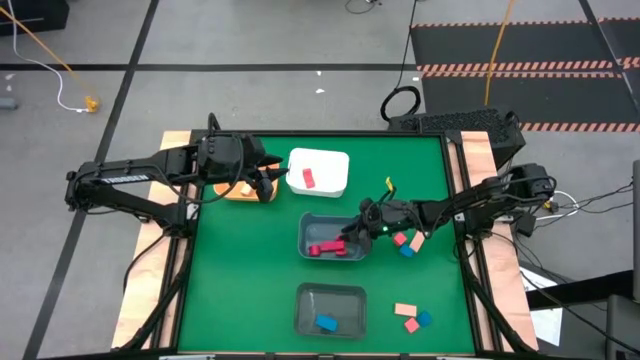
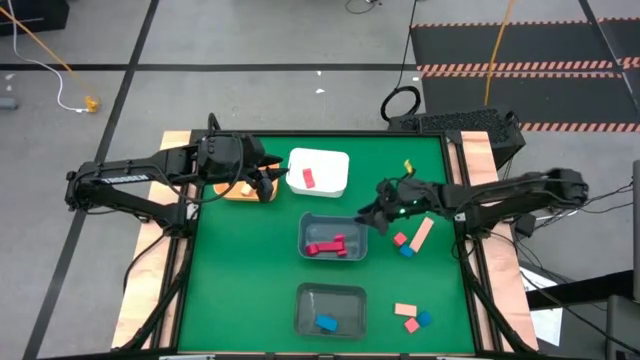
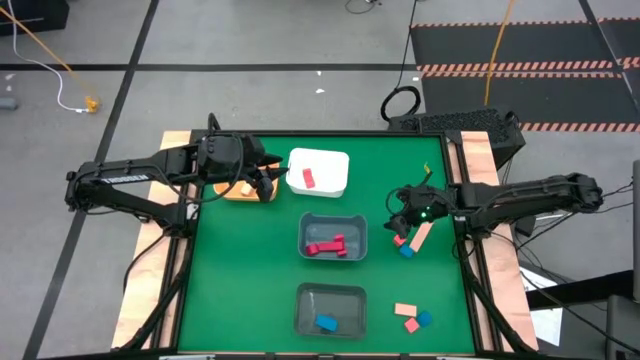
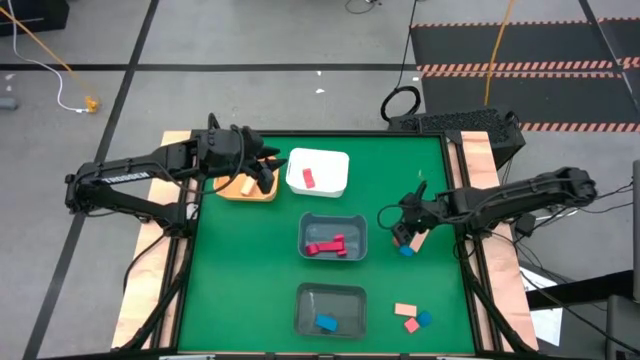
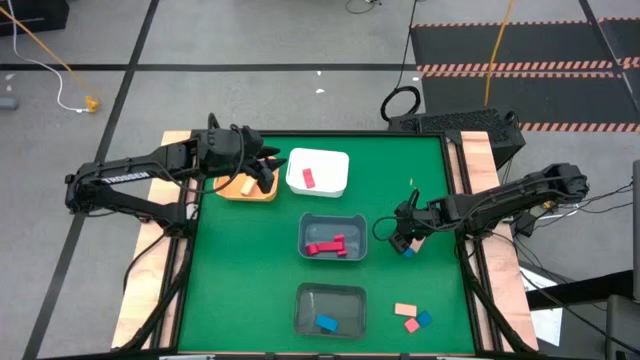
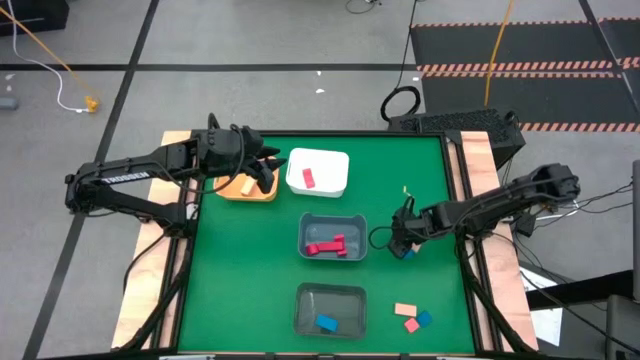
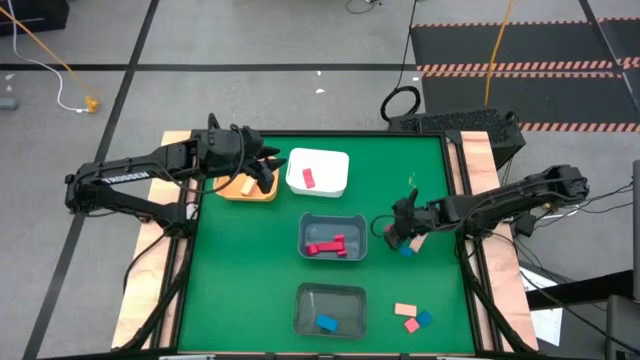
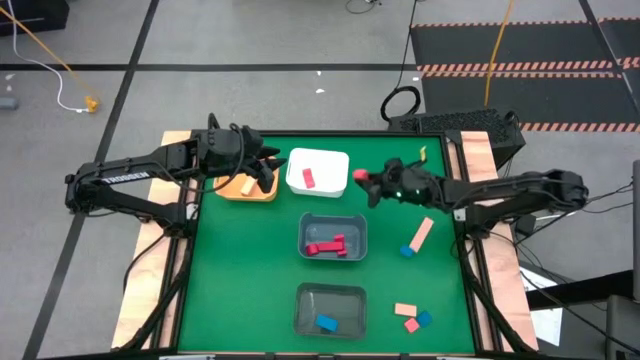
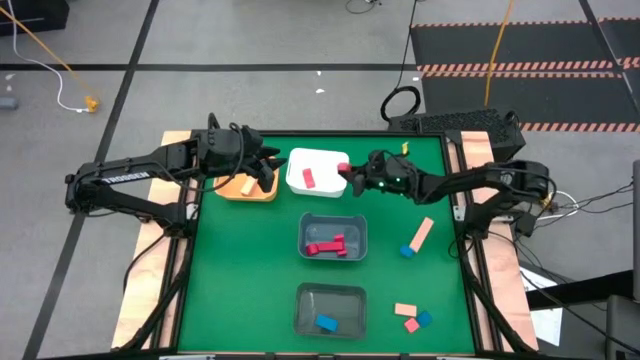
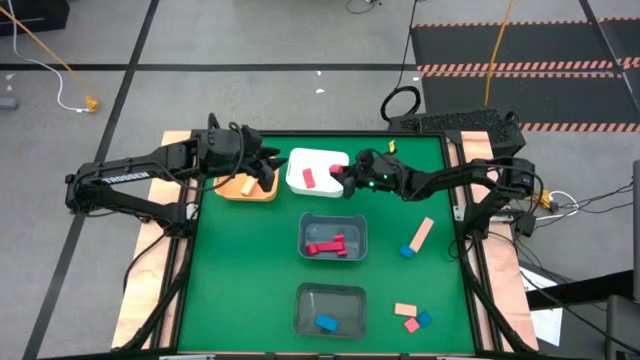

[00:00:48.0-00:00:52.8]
Task: Sort & place blocks by color
Put the top orange wooden block into the white bin

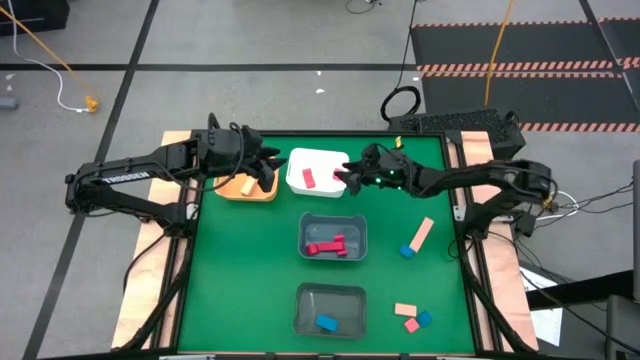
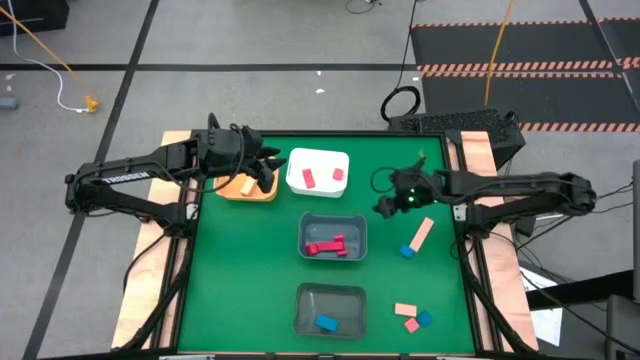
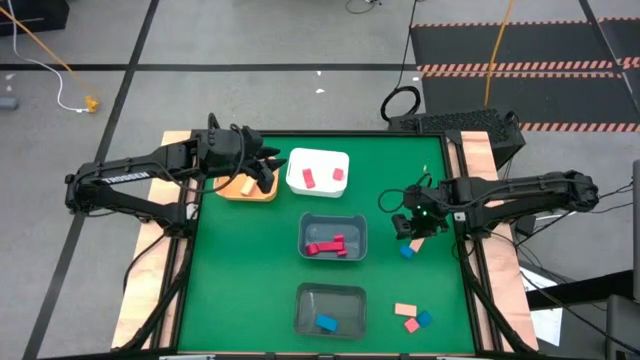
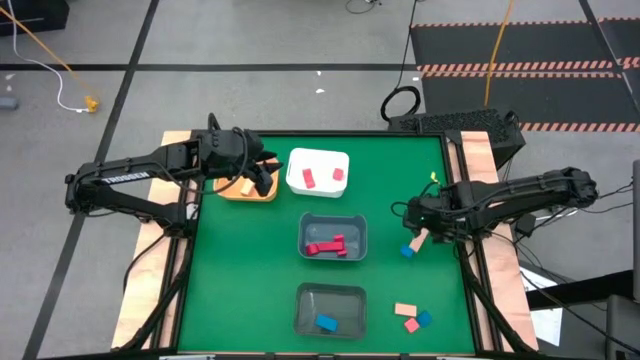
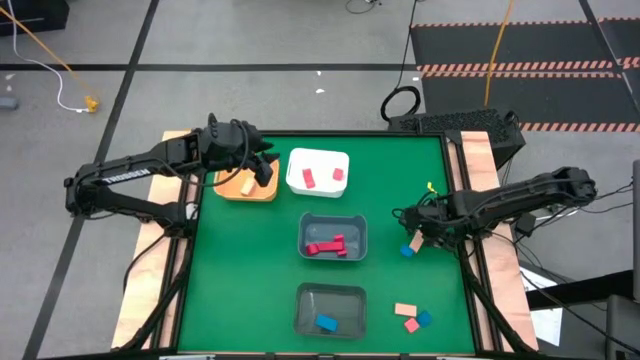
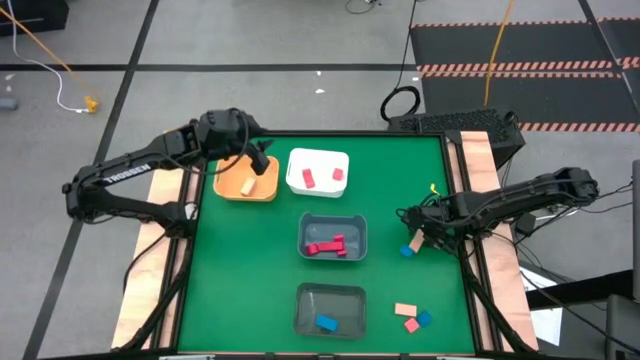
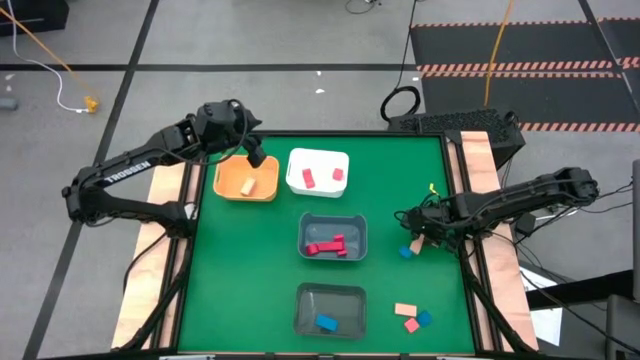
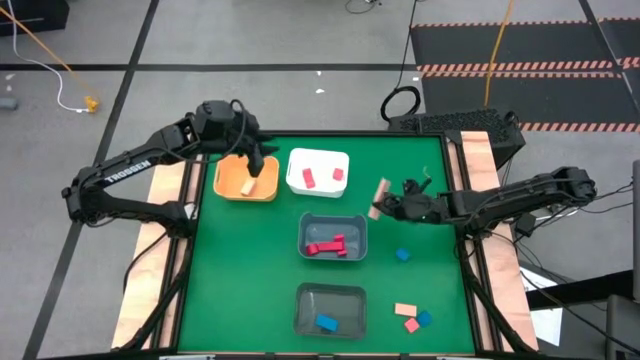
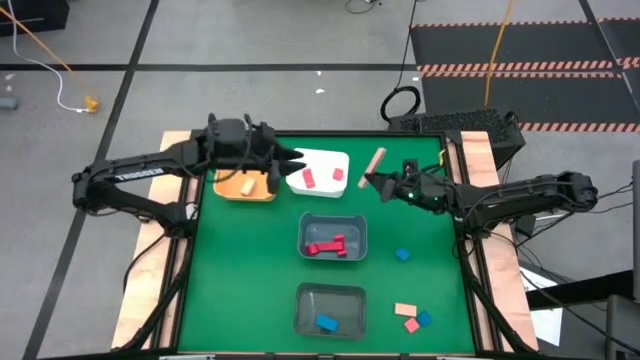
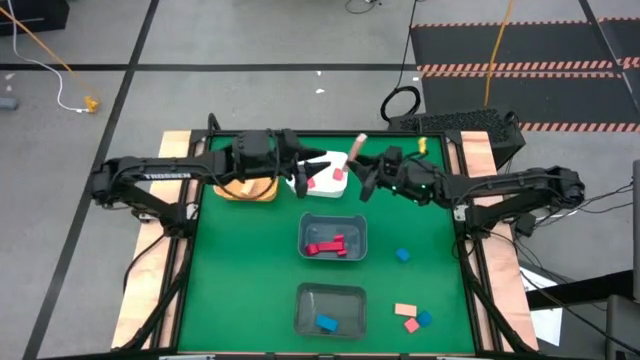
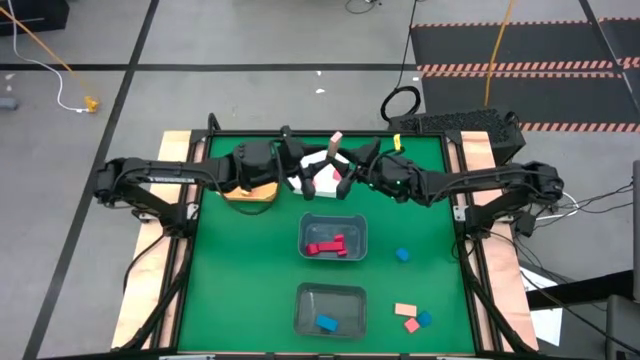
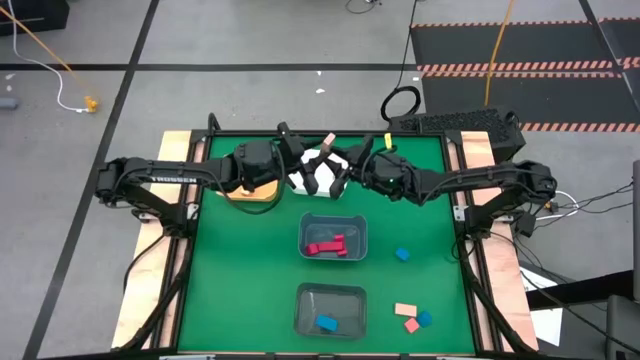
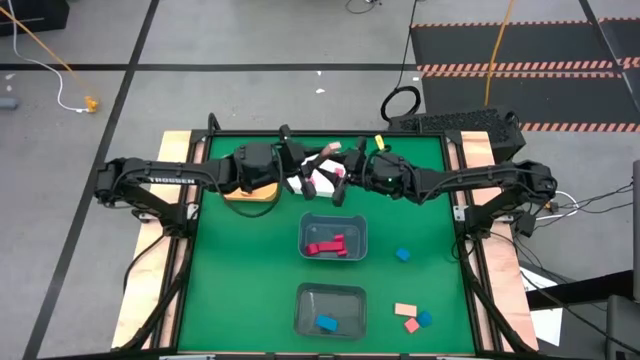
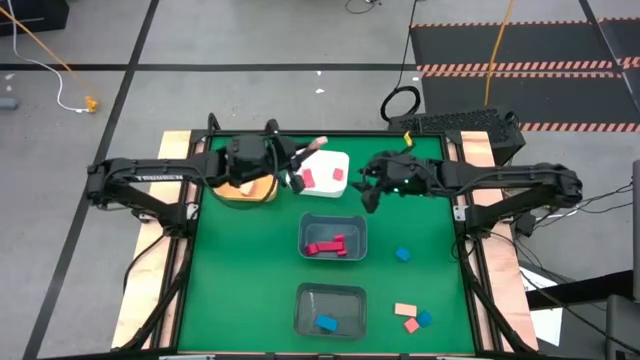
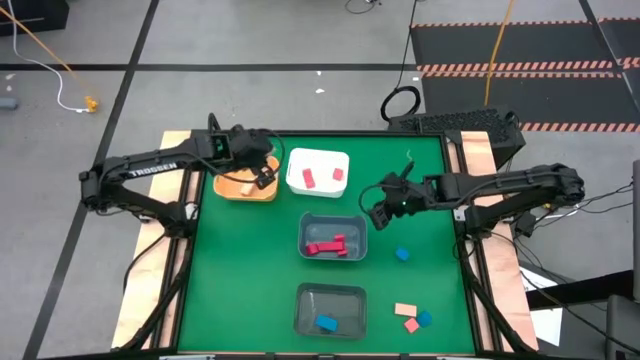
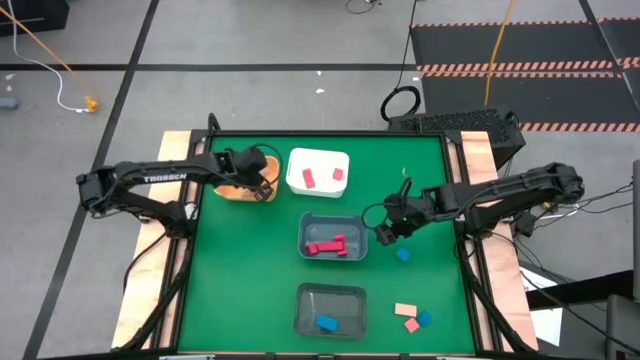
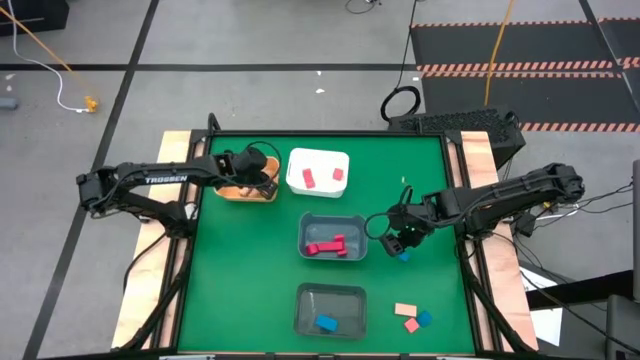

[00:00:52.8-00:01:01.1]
Put the top brown wooden block into the yellow bin

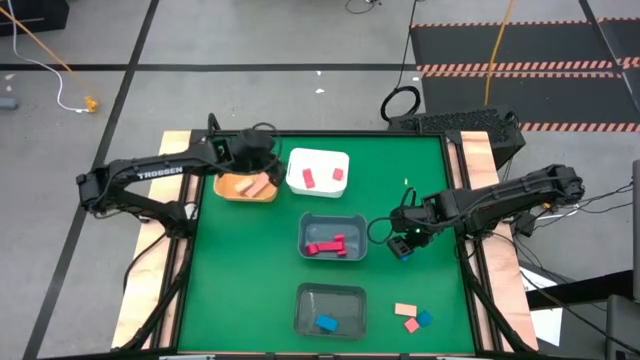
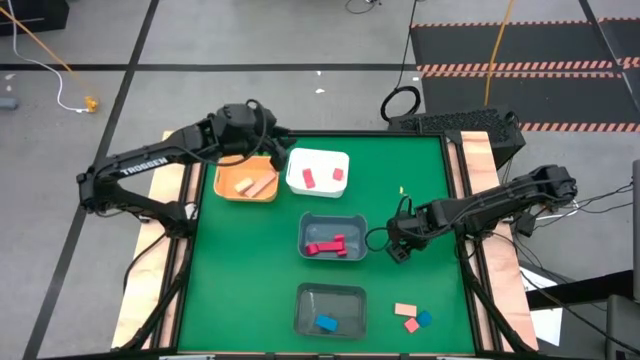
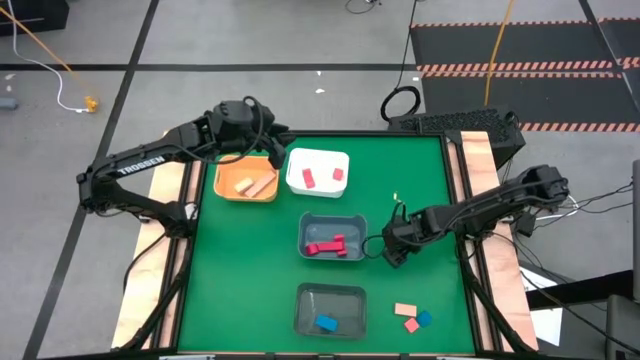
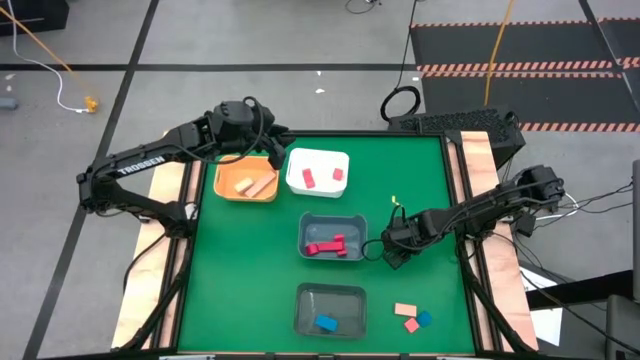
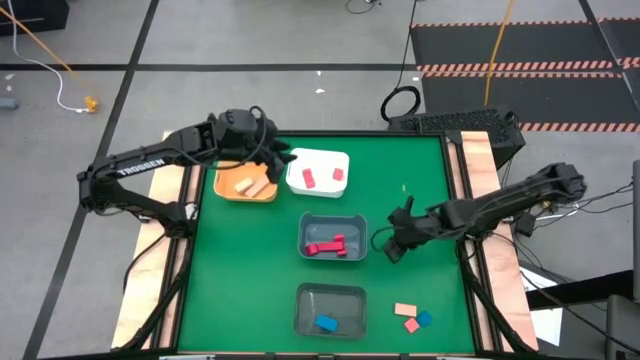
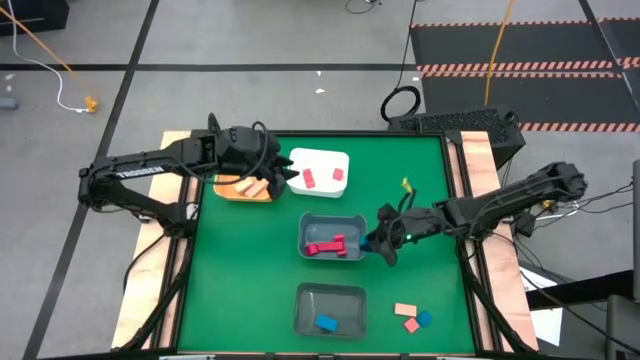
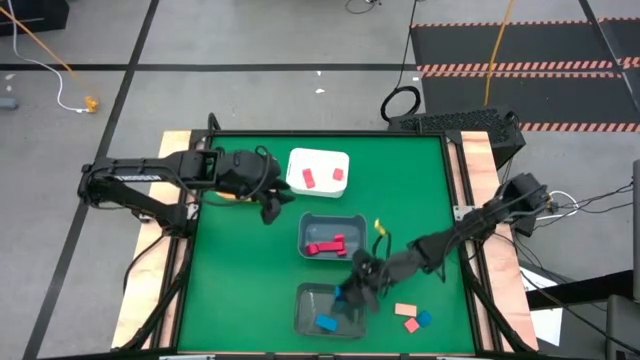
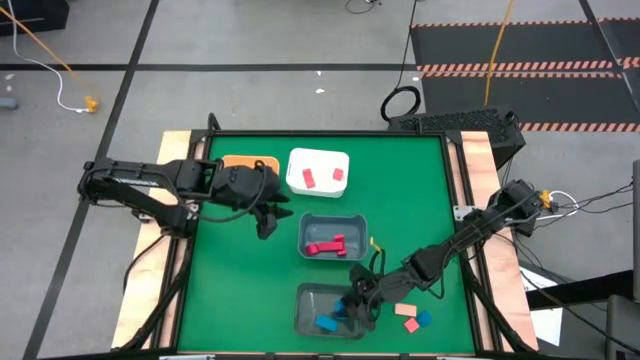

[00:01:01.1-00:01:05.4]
Put the top blue wooden block into the black bin

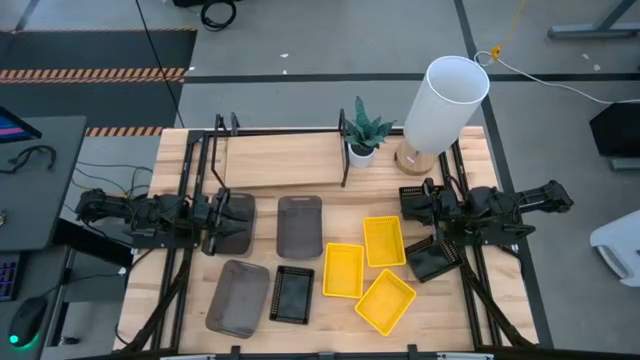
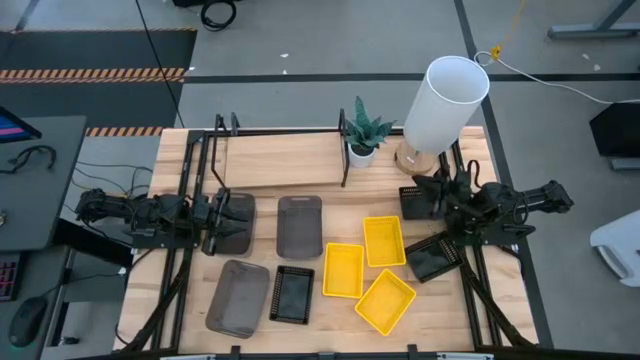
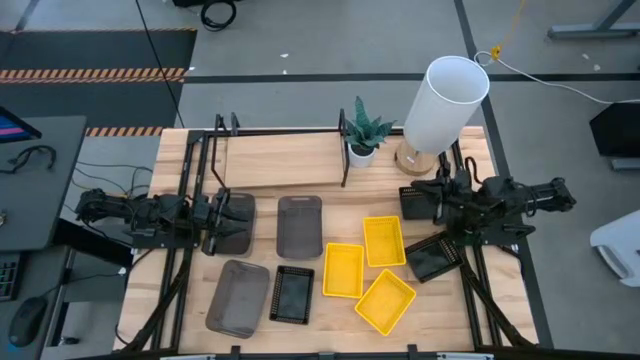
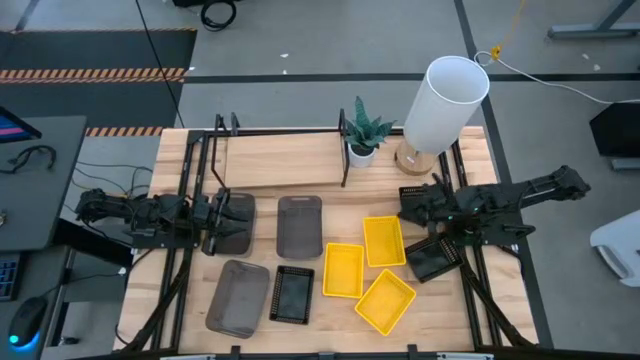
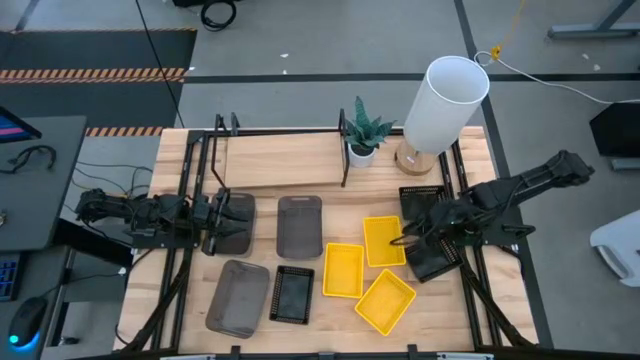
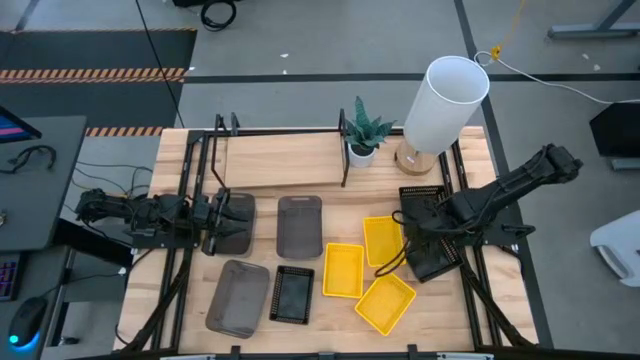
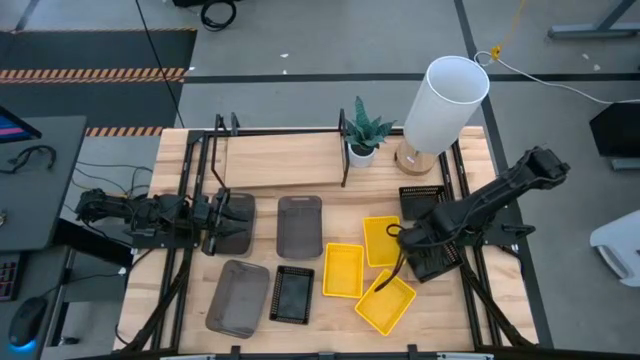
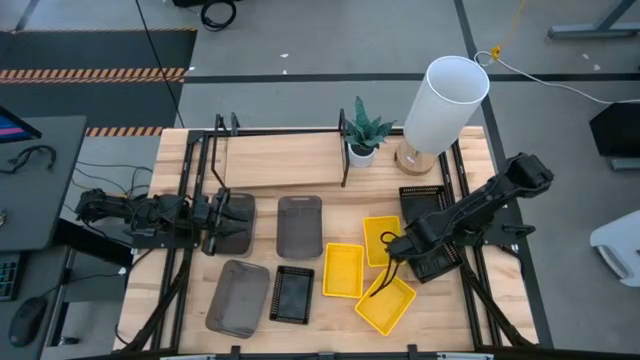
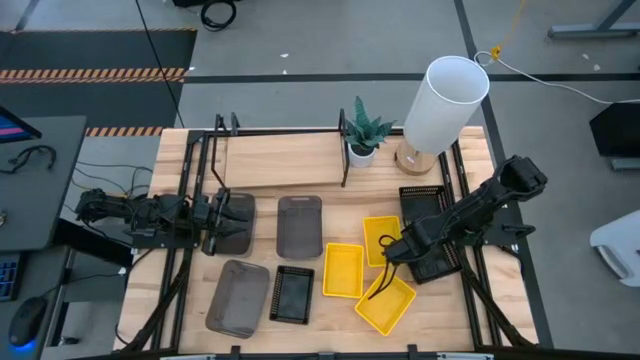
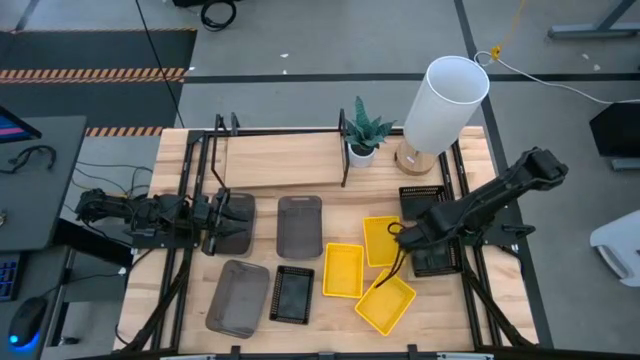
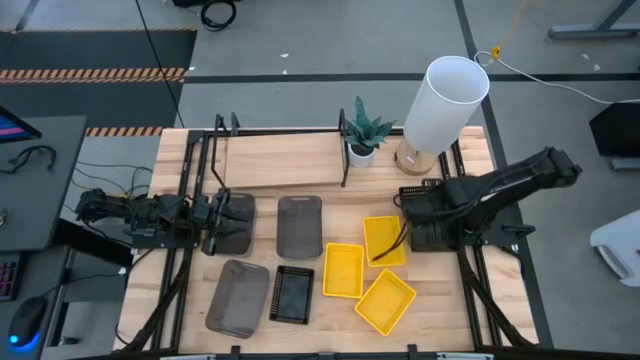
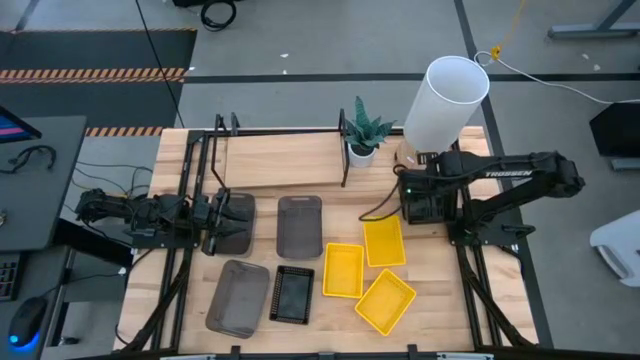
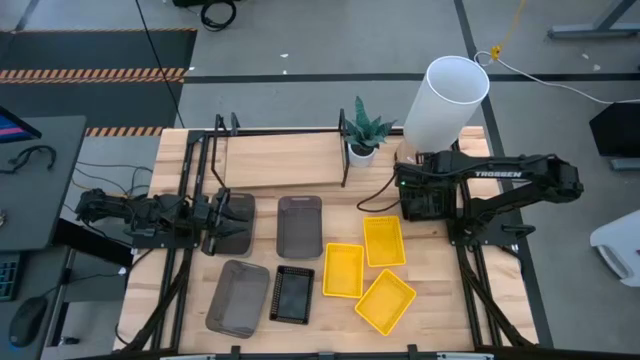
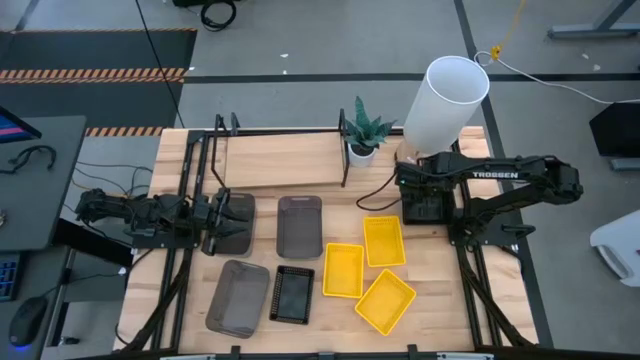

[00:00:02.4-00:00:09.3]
Task: Stack baskets on shelf by color
Stack the bottom right black bin on the top of the top black bin
